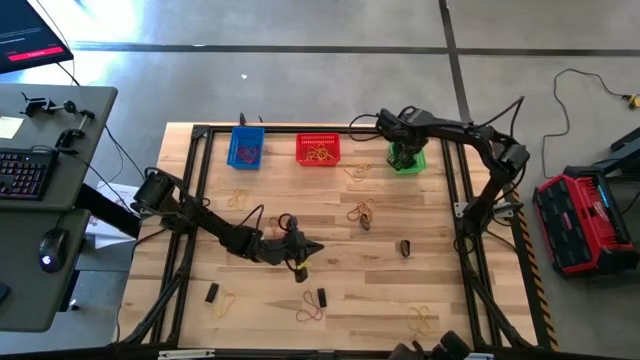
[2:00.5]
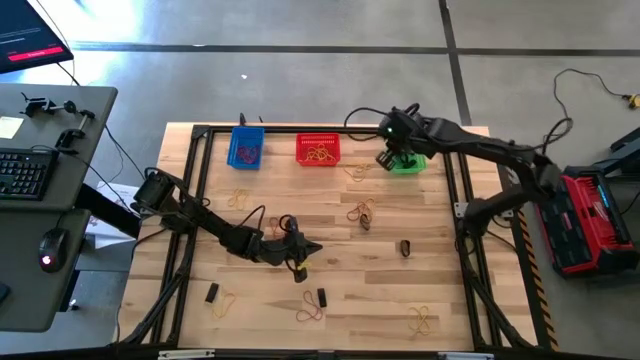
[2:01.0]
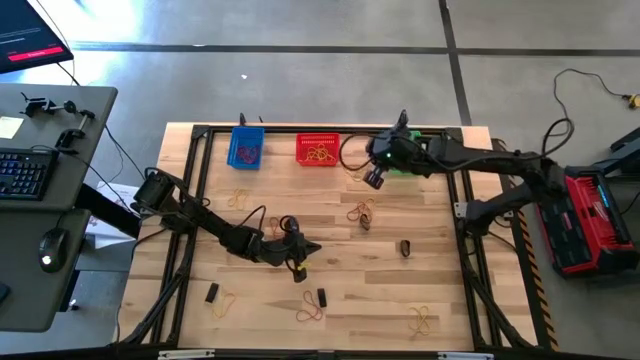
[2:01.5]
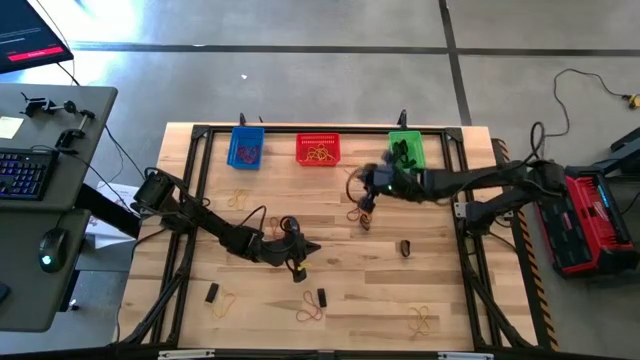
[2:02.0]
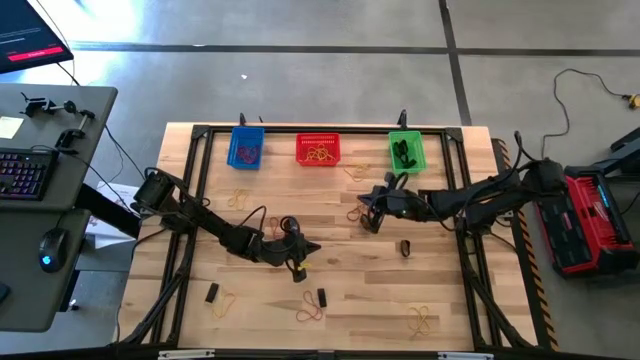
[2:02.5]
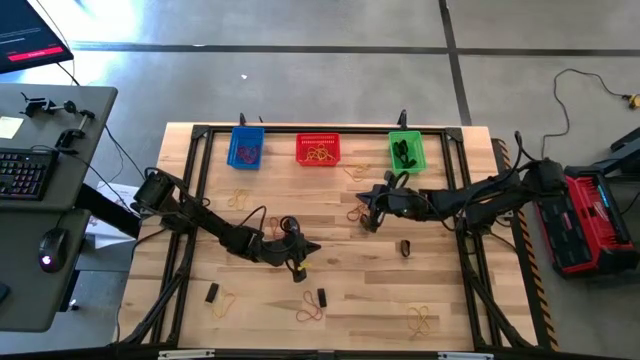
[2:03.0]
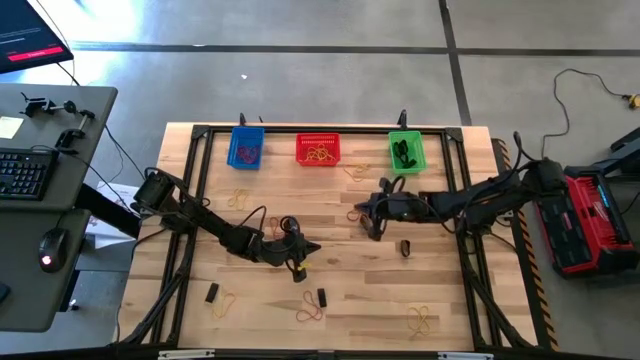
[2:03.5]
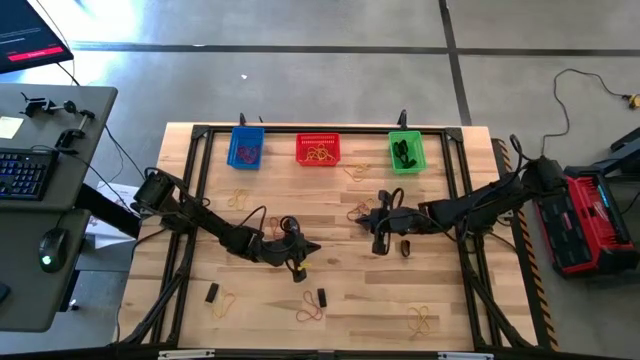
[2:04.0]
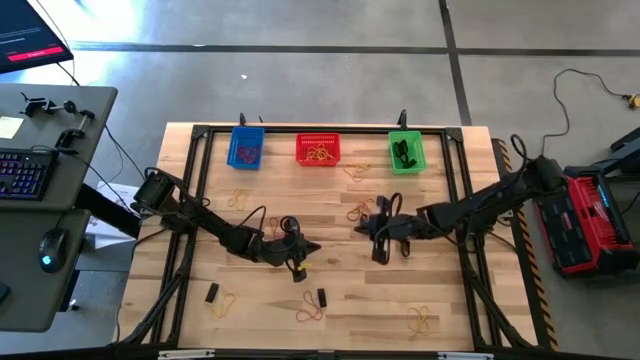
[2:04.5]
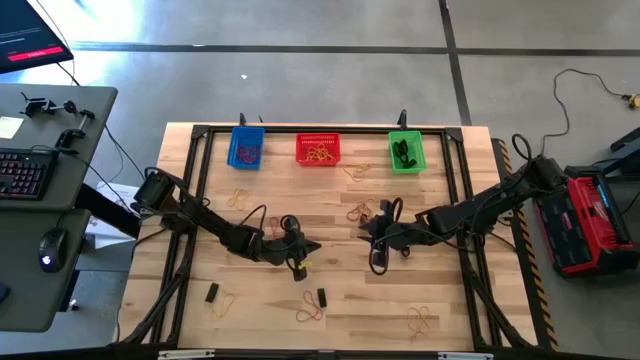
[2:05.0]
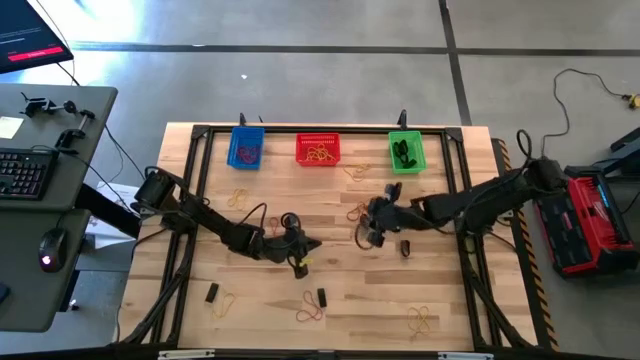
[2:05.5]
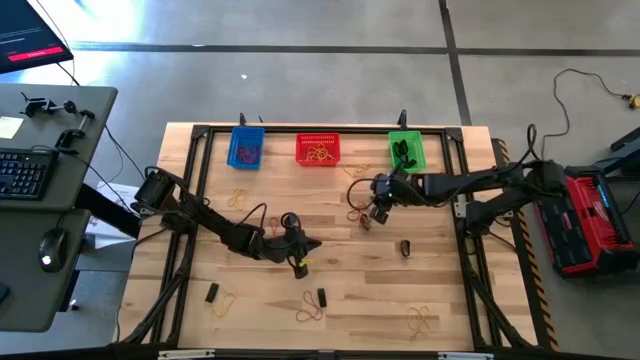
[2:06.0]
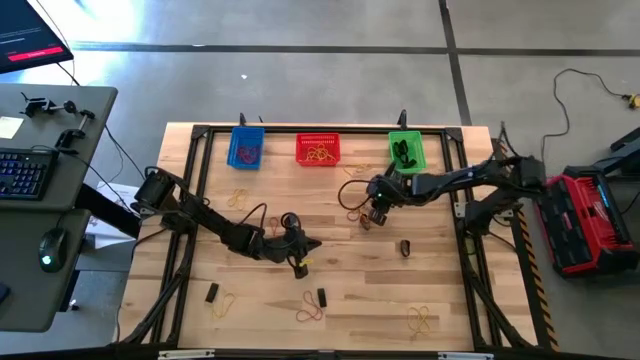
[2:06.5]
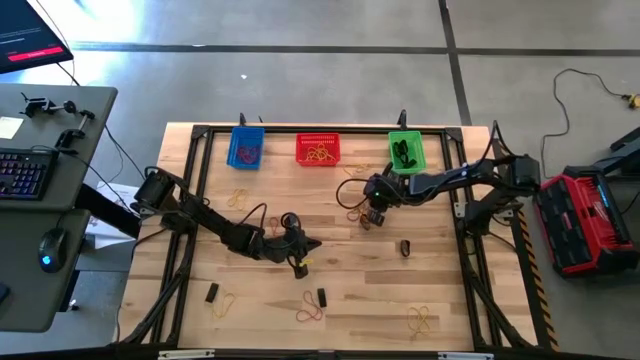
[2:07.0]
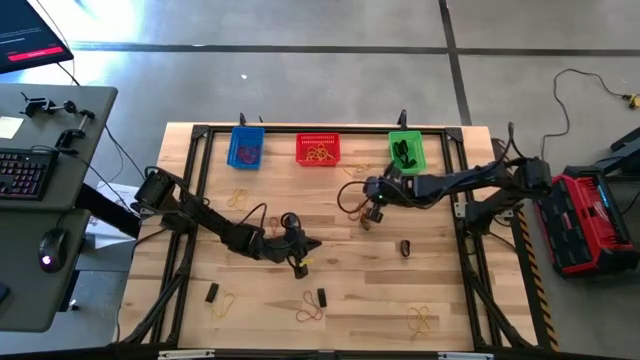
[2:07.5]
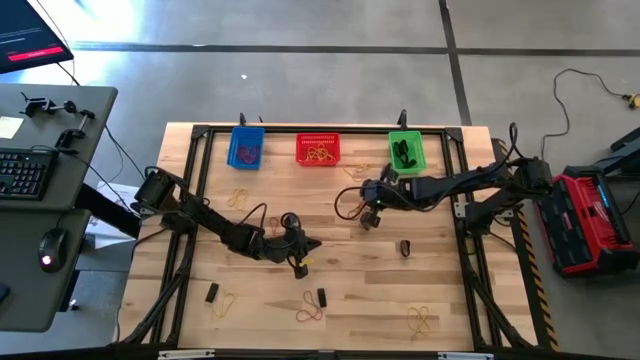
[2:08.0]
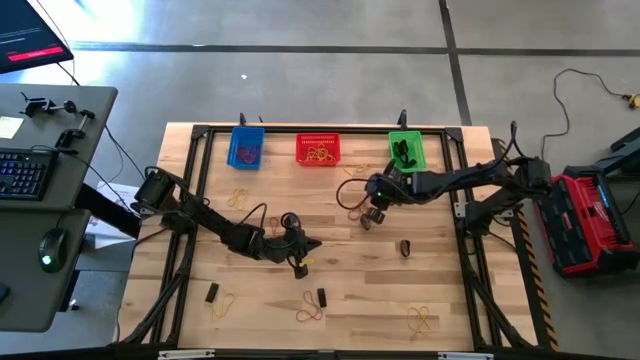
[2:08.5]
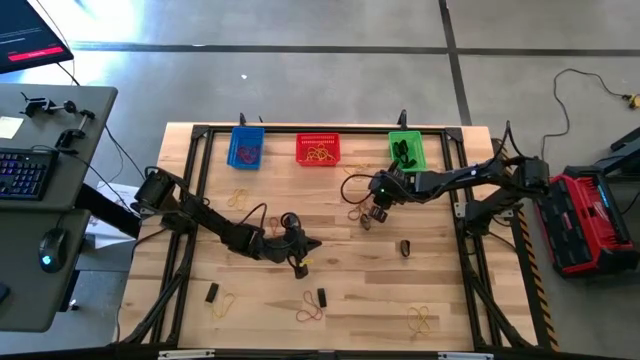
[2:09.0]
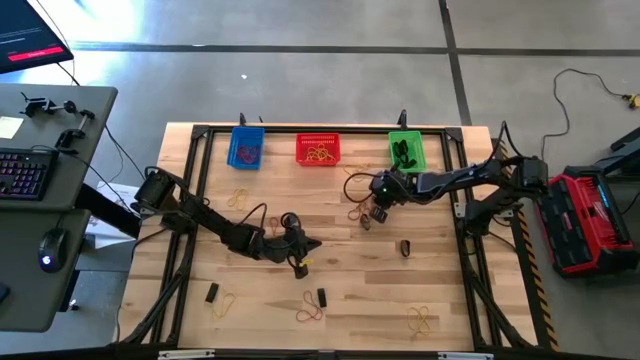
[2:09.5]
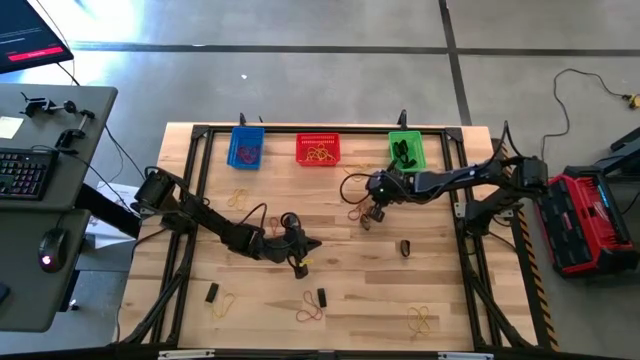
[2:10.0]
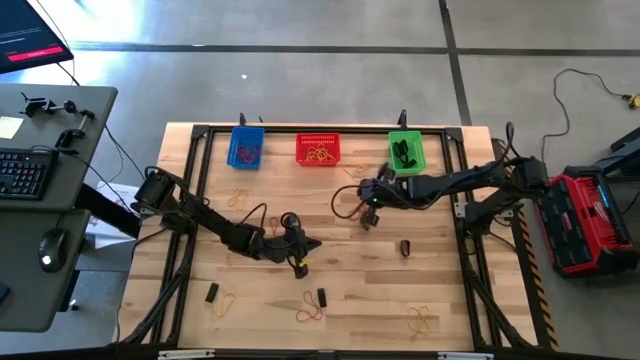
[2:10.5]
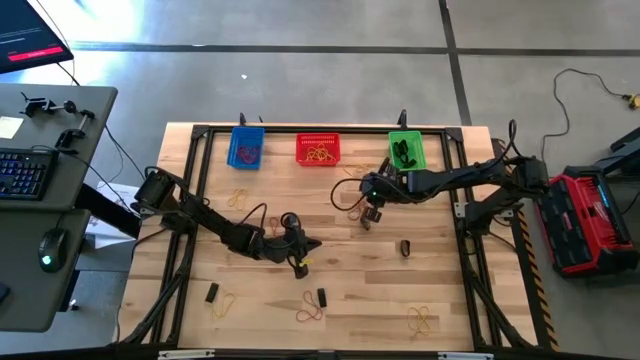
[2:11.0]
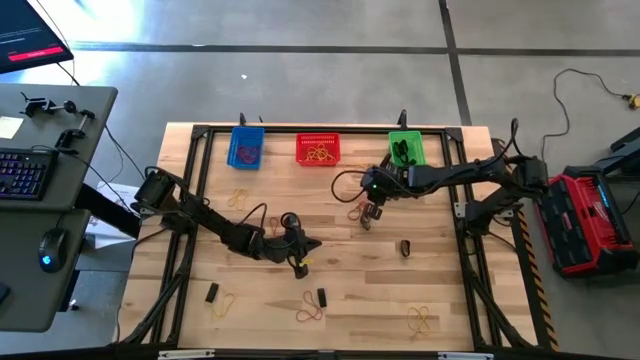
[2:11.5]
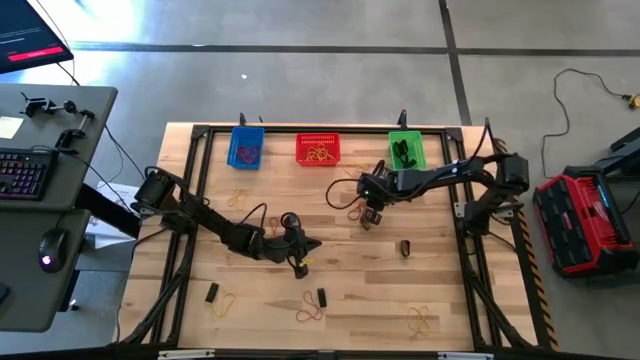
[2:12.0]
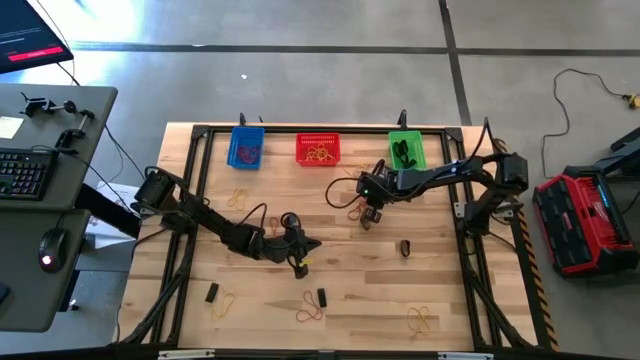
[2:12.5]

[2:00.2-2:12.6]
Task: Sort rubber bands into baskets
Put the yellow rubberband into the orange bin

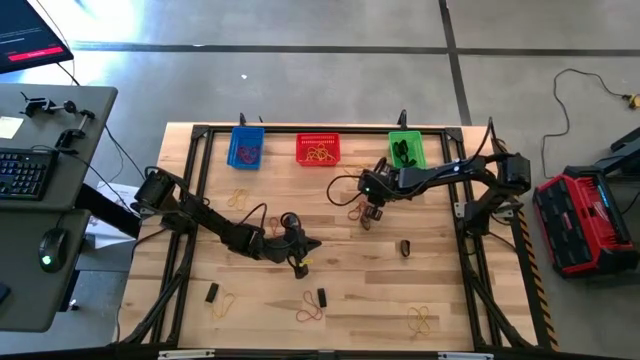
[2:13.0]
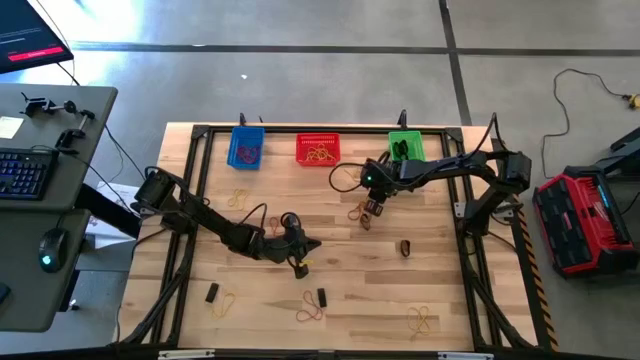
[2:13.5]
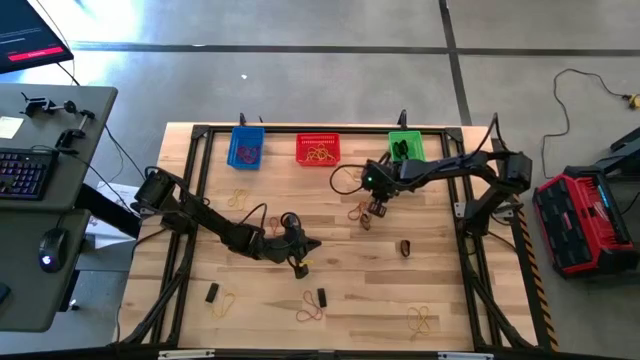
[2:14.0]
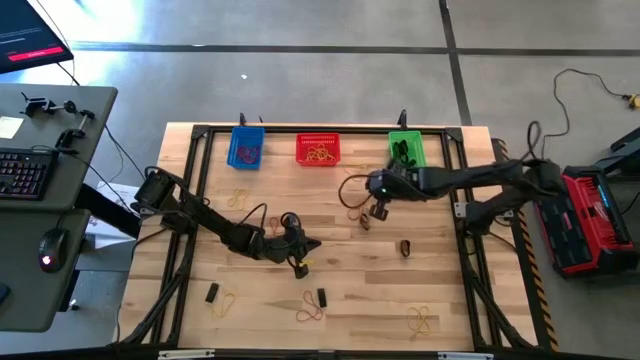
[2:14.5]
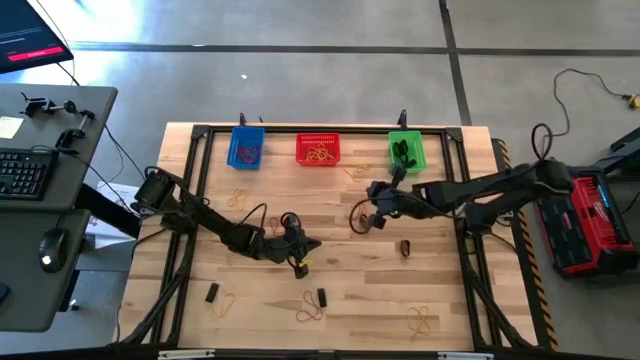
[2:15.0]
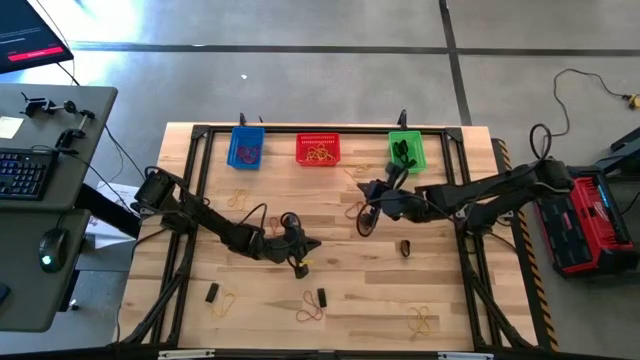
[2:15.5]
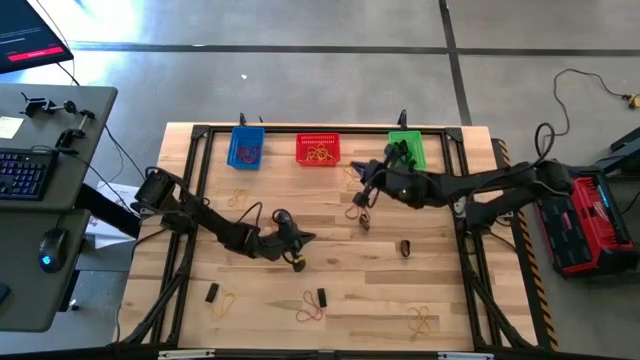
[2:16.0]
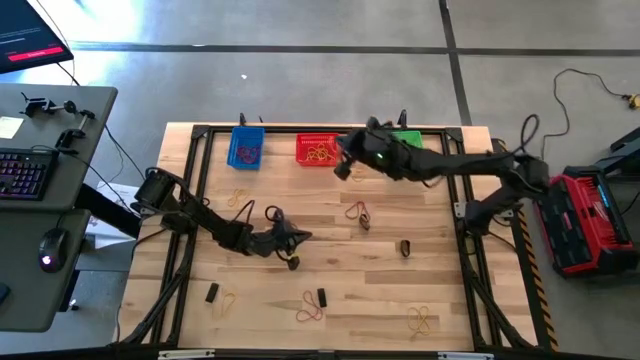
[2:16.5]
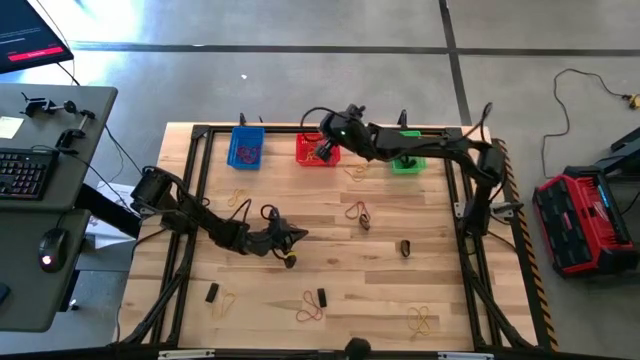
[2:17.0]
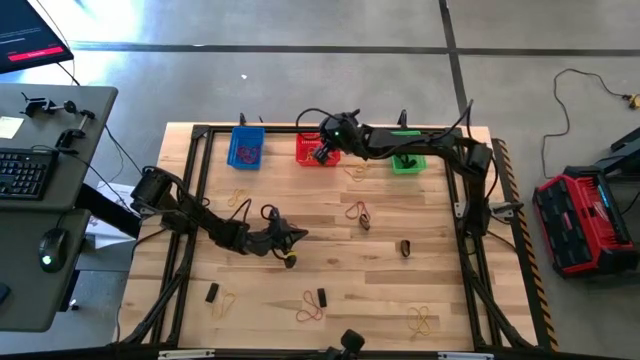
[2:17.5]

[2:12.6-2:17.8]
Put the rubberband into the orange bin

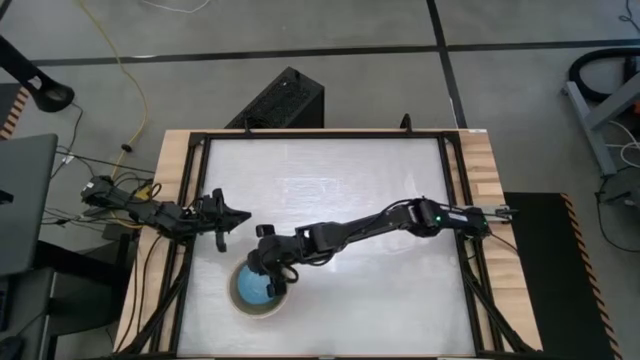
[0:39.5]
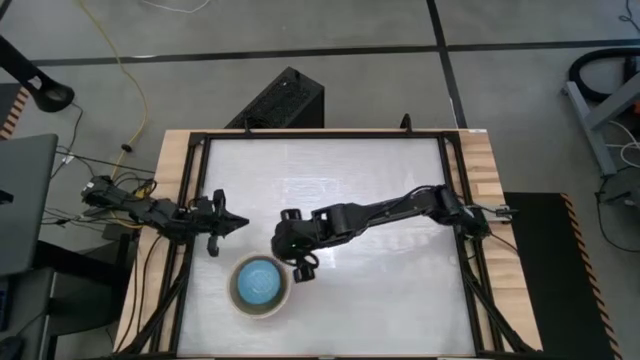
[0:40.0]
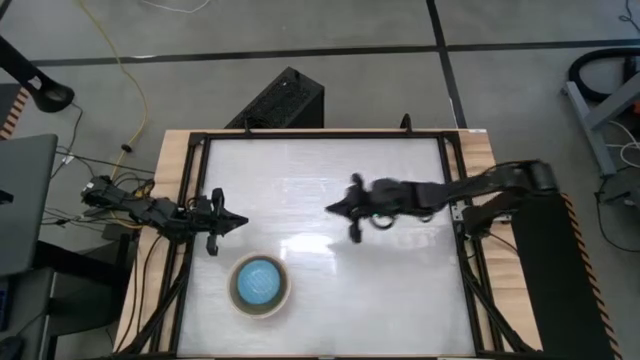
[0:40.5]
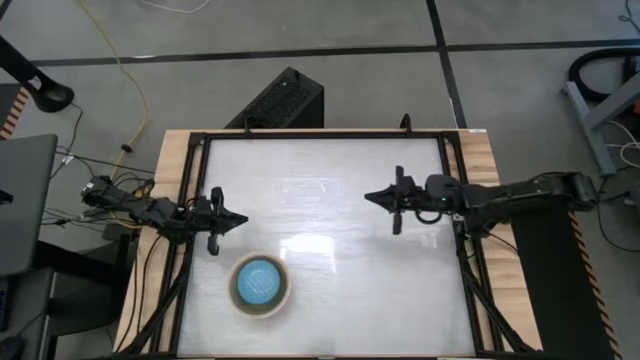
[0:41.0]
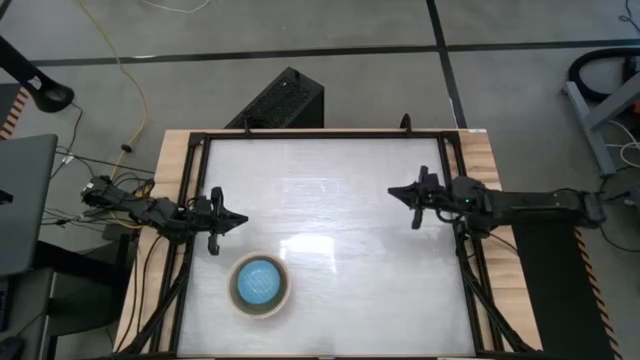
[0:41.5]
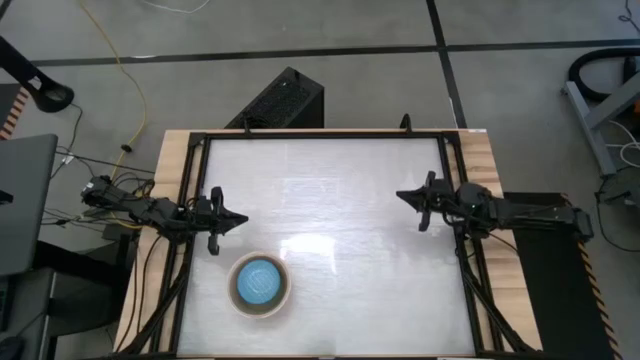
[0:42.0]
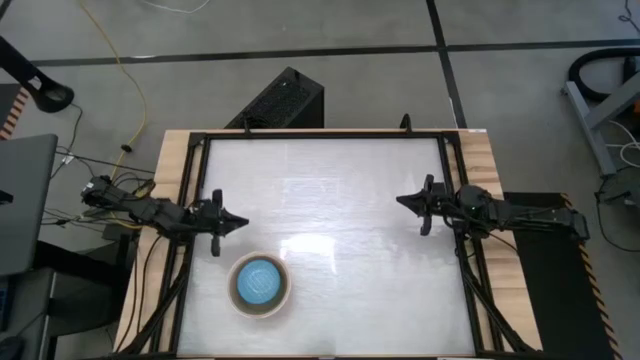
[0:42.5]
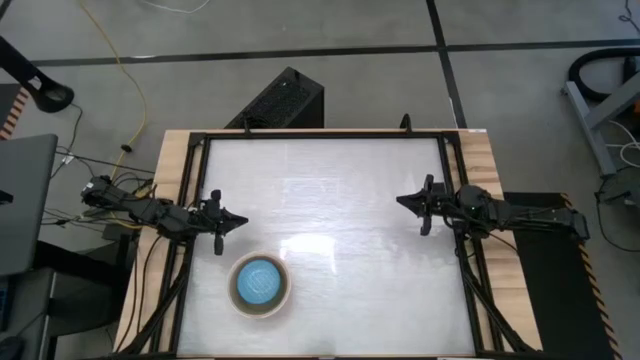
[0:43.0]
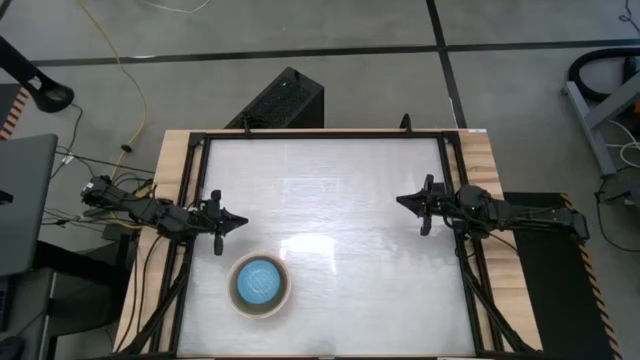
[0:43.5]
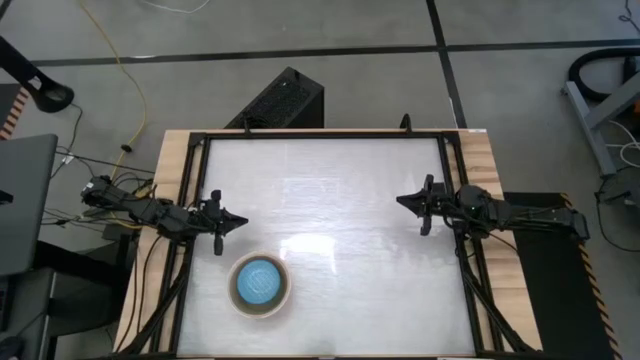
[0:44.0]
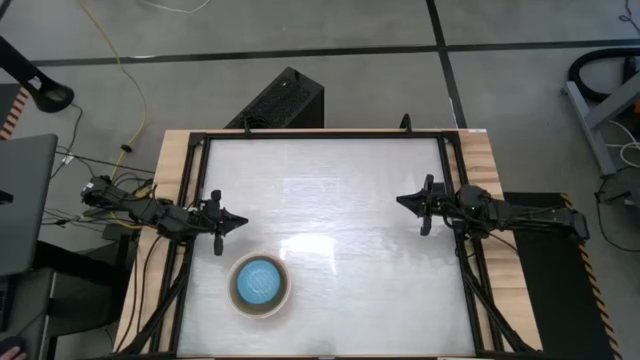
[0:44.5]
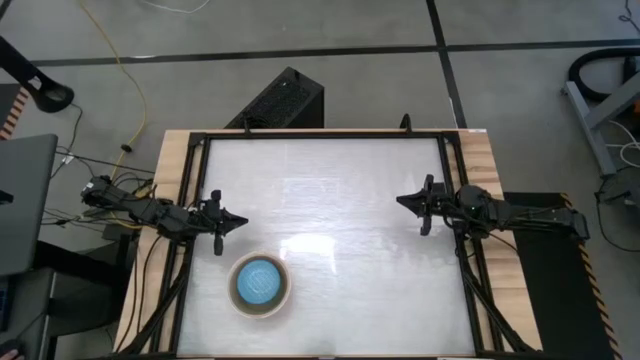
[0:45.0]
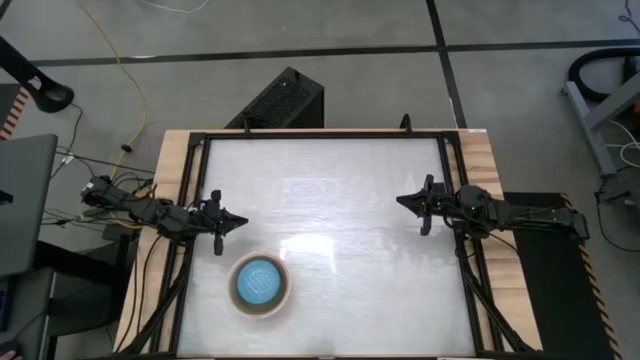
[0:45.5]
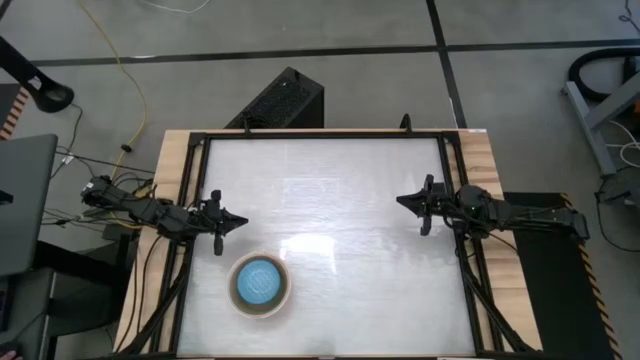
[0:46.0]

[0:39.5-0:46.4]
Task: Nest bowls inside each other by size order
Return to Home Position
